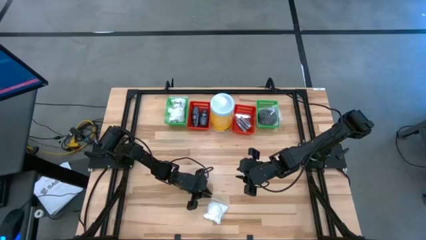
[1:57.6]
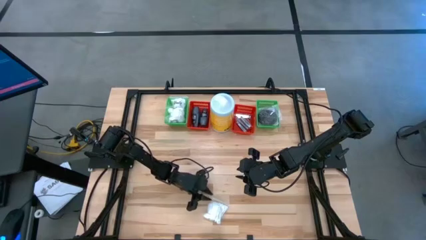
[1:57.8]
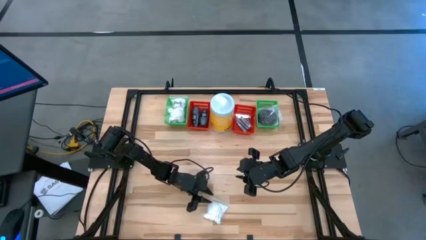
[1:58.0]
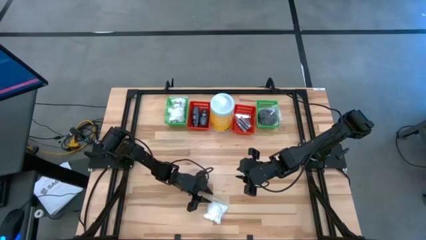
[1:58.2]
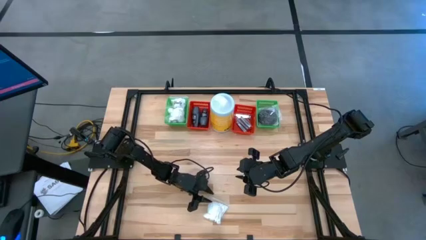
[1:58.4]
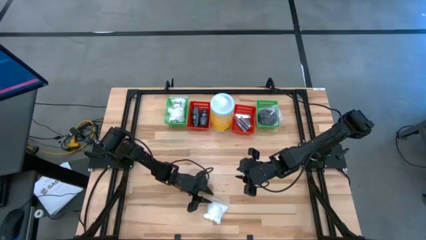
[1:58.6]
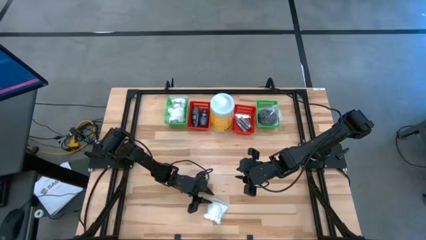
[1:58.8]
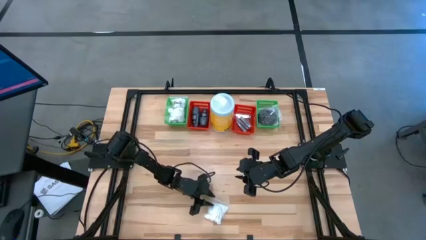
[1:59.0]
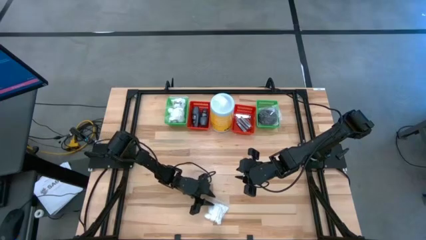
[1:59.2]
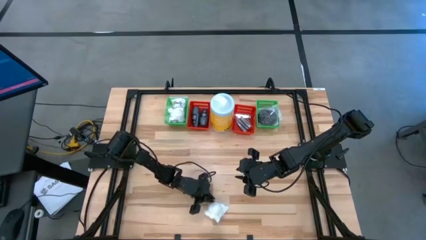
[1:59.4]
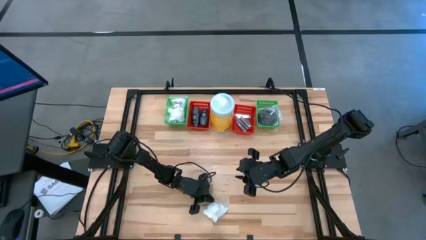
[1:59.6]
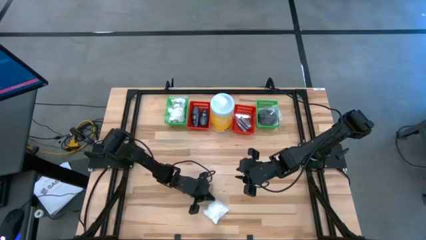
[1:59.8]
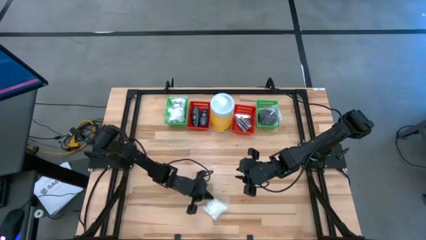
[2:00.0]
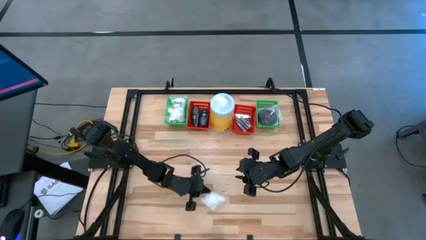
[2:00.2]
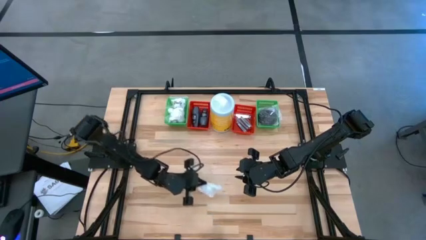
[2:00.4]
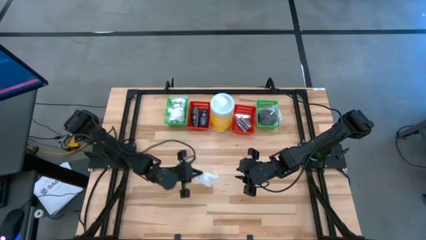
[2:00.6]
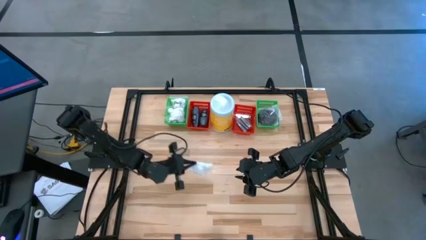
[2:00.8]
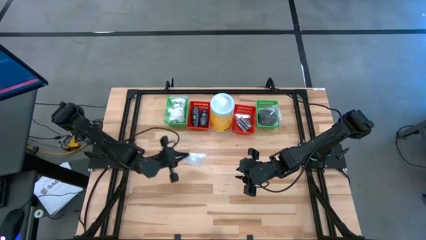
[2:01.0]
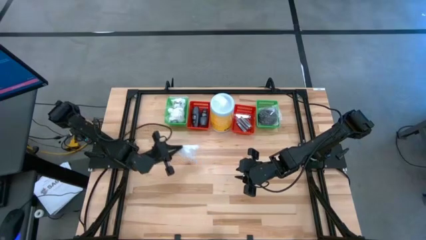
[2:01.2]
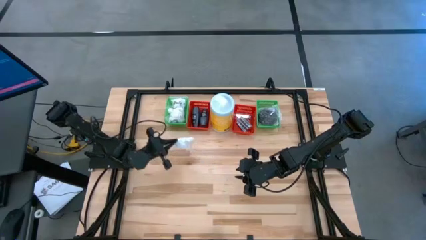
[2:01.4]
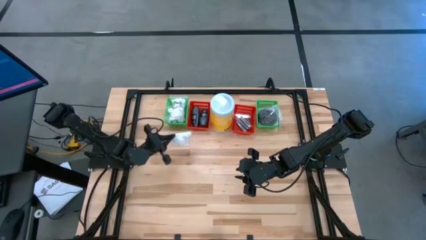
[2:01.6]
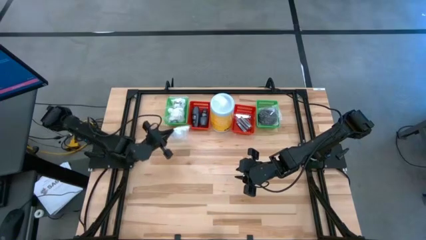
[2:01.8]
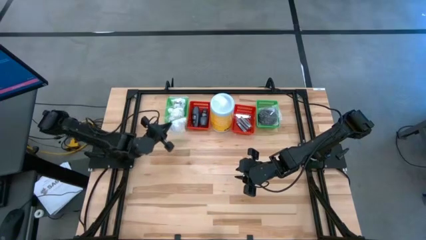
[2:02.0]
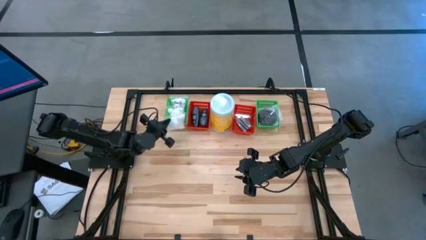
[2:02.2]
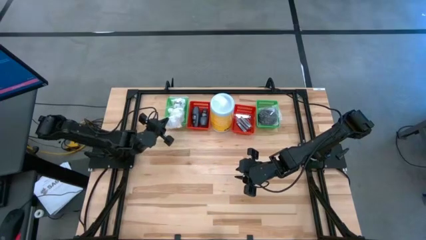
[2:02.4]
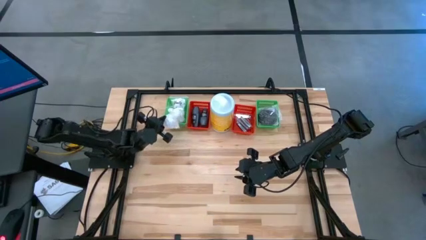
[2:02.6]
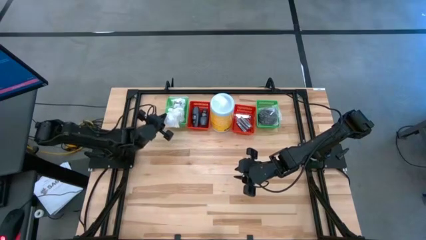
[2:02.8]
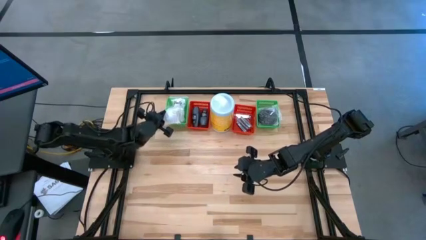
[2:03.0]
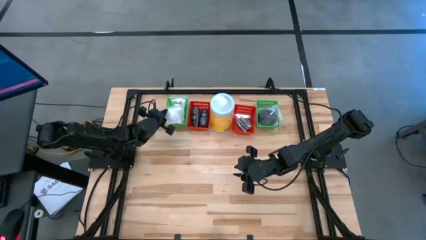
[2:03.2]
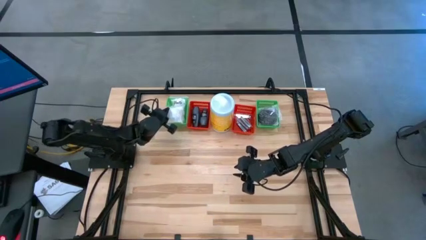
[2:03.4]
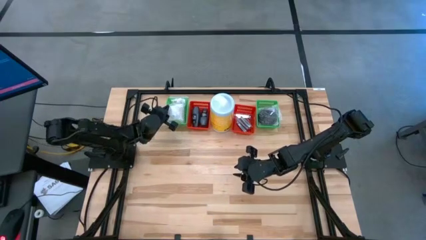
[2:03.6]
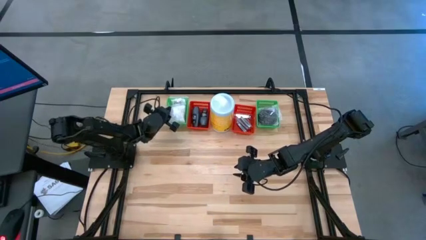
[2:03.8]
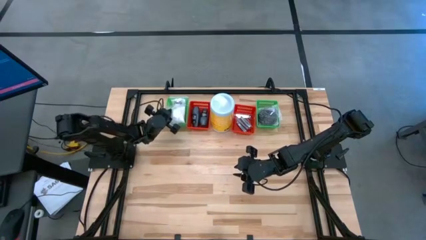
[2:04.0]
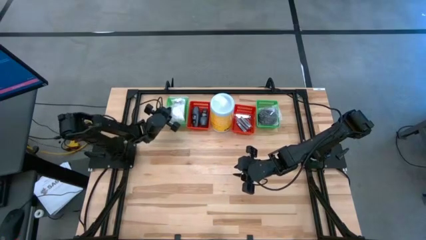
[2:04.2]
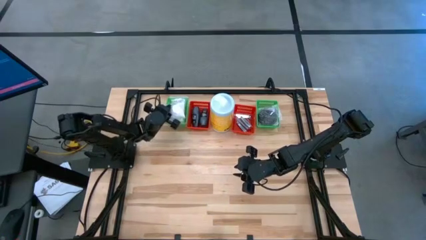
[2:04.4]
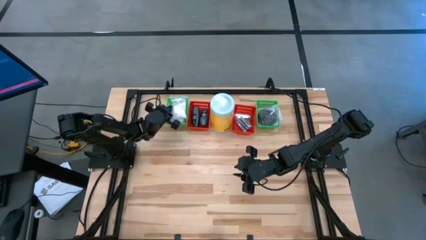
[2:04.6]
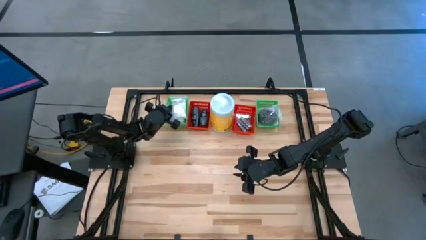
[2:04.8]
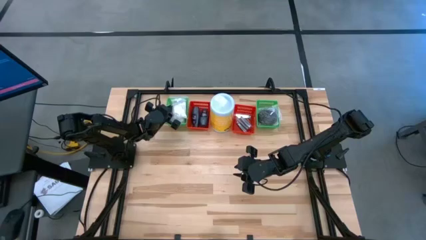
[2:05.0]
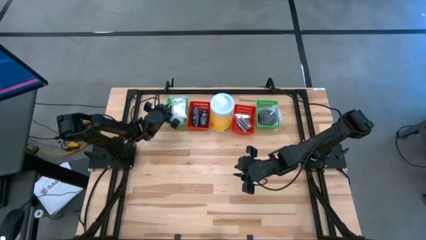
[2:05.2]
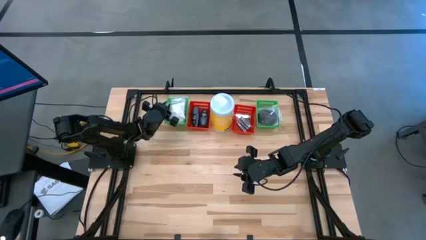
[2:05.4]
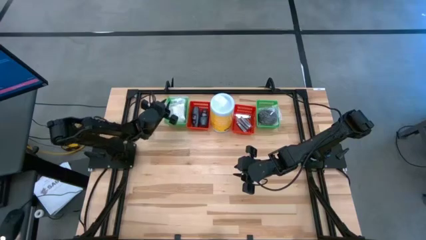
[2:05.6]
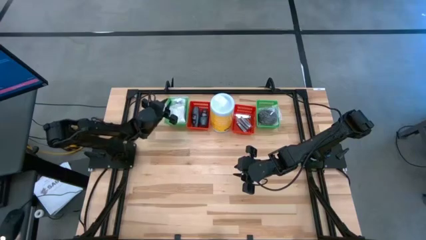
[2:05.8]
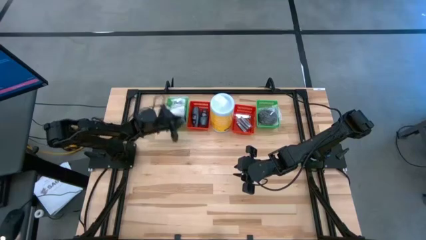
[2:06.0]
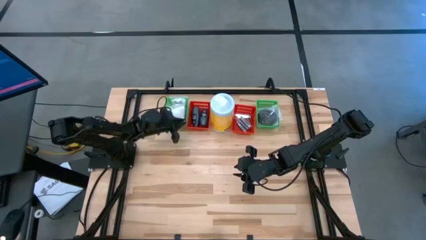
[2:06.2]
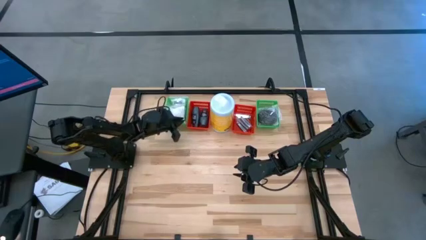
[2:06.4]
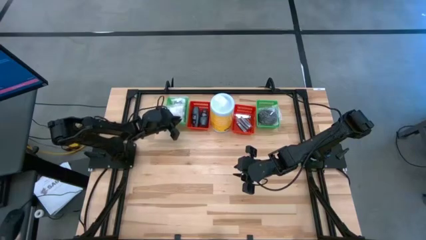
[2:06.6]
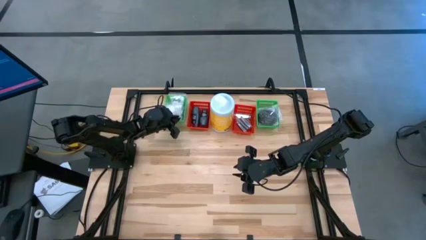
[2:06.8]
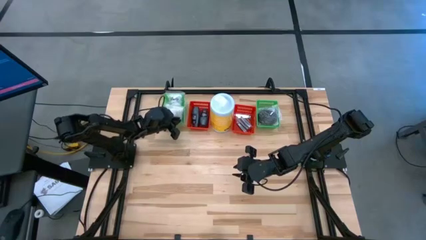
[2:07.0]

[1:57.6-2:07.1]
Task: Pick & Place Travel size toiletries
Put the white cotton pack into the left green bin

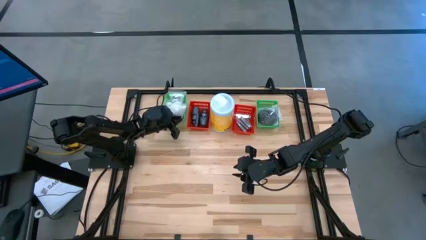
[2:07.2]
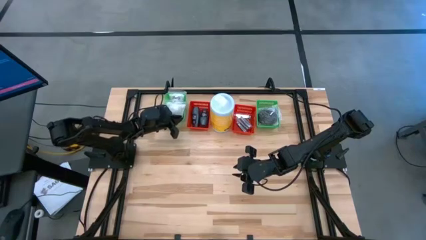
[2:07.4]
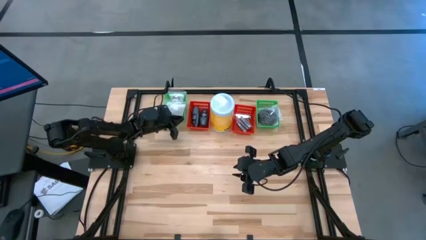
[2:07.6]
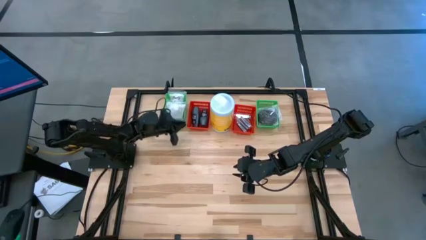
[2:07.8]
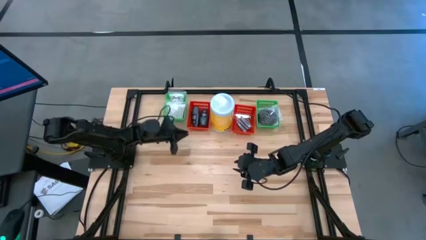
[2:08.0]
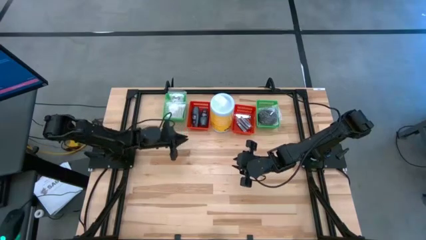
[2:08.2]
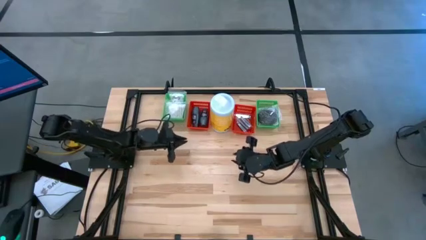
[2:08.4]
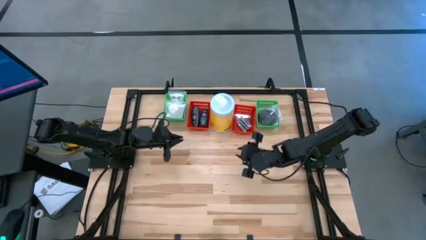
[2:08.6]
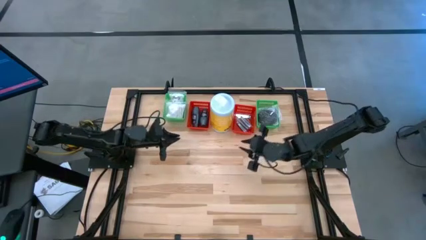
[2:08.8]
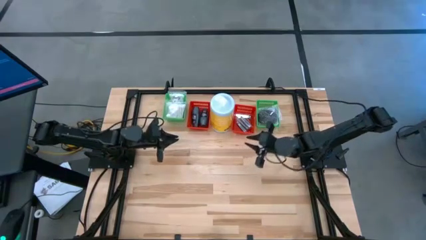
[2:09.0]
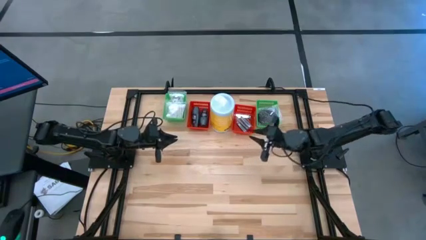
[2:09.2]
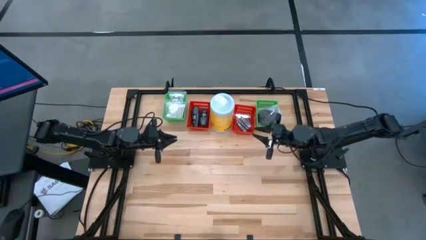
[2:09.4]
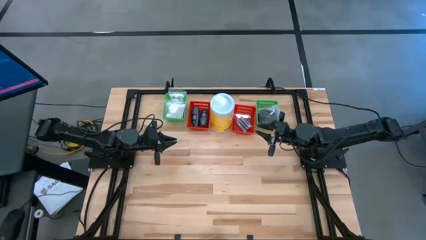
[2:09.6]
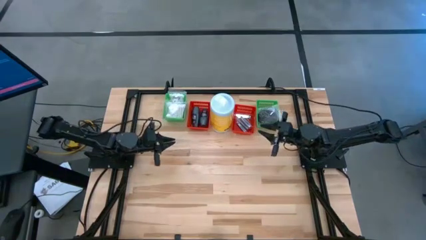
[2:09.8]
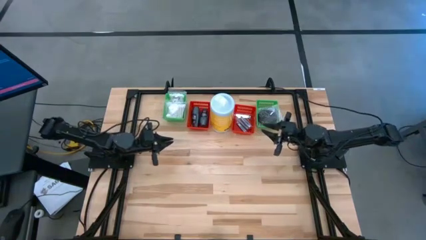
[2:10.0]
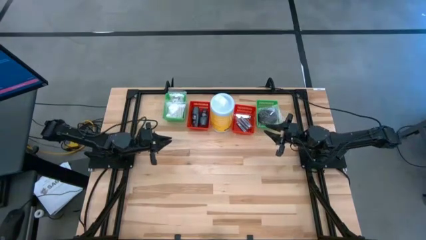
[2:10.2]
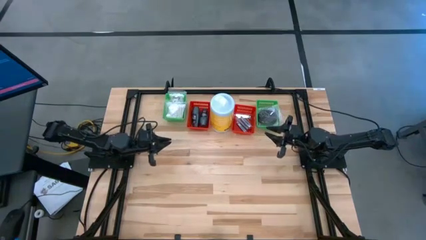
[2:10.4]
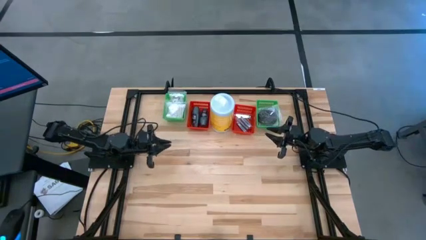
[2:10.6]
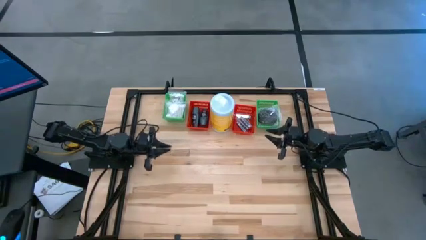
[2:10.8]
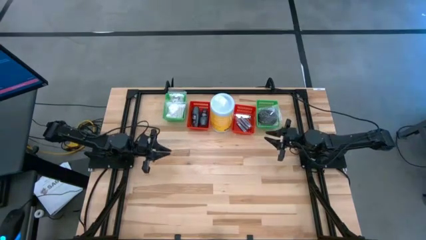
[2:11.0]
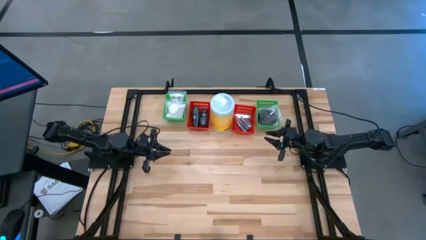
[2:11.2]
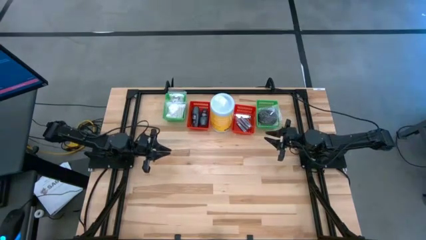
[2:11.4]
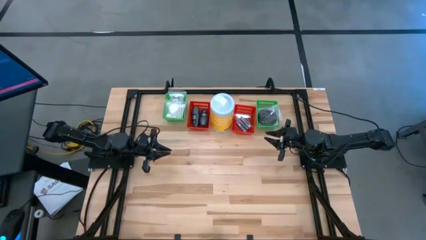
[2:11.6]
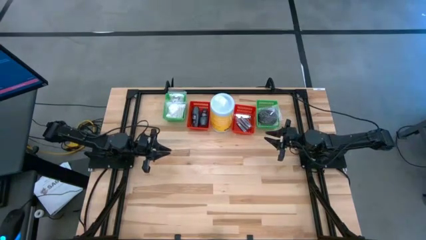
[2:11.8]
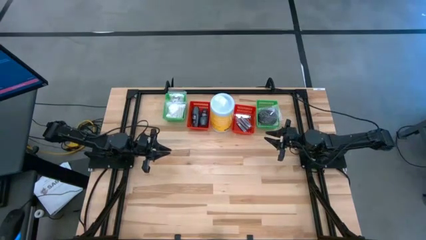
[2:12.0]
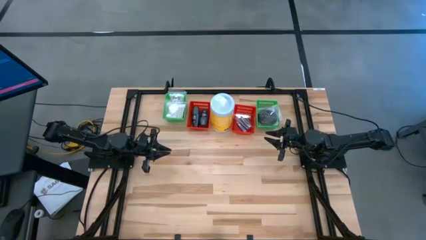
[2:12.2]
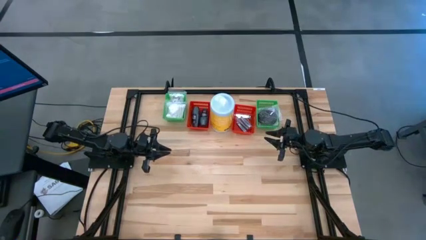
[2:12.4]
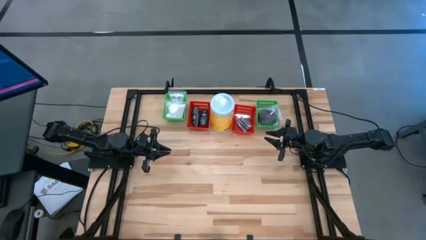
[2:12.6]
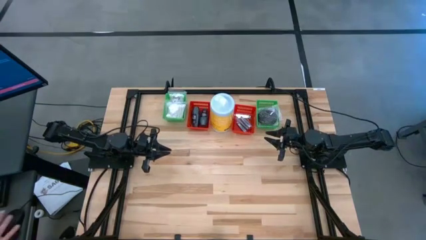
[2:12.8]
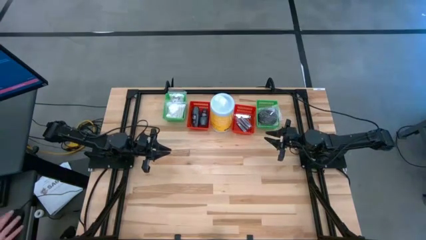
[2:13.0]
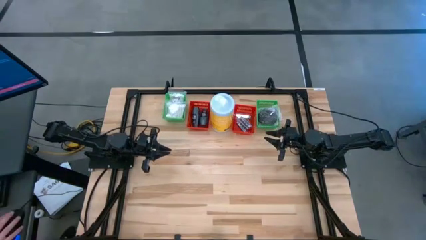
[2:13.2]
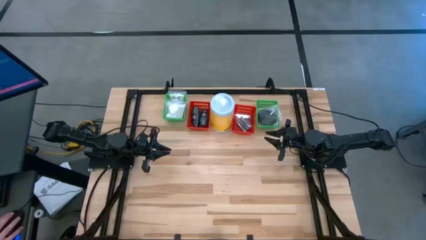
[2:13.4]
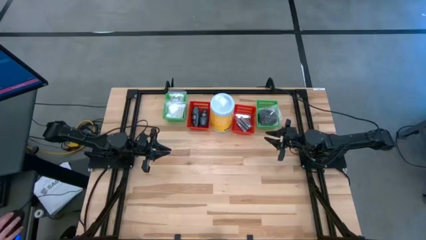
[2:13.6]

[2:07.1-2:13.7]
Return to Home Position
